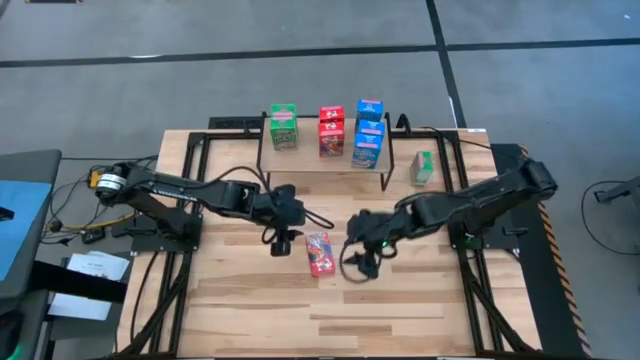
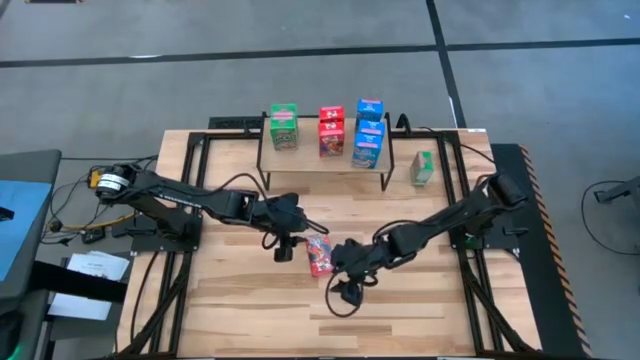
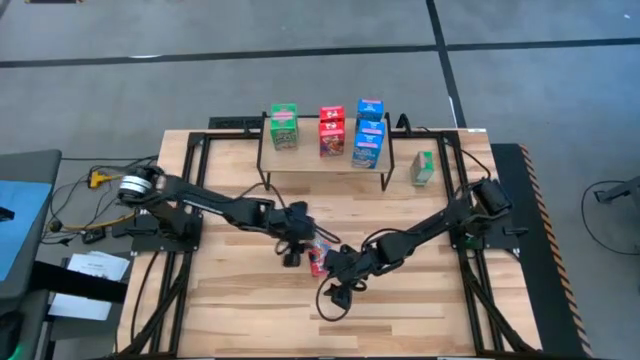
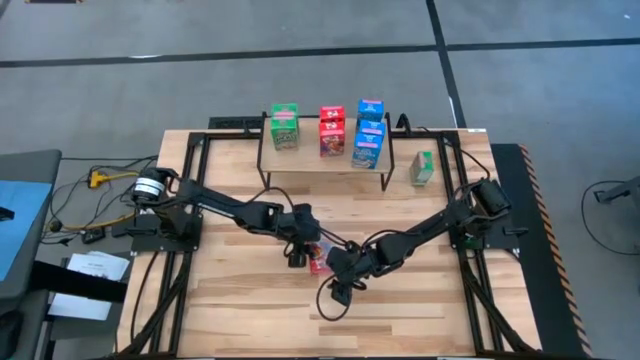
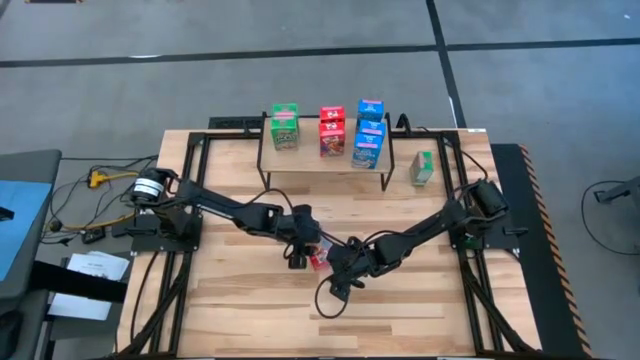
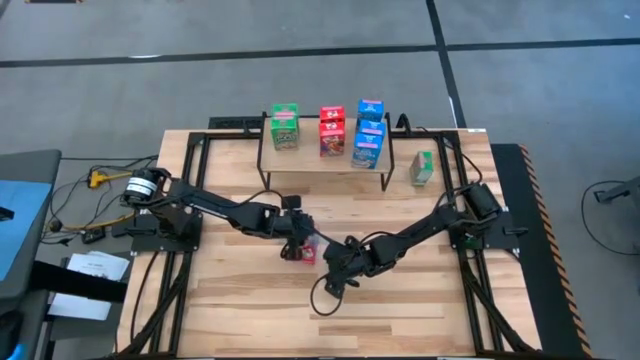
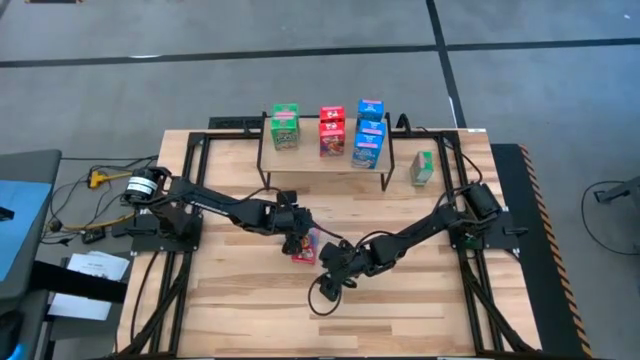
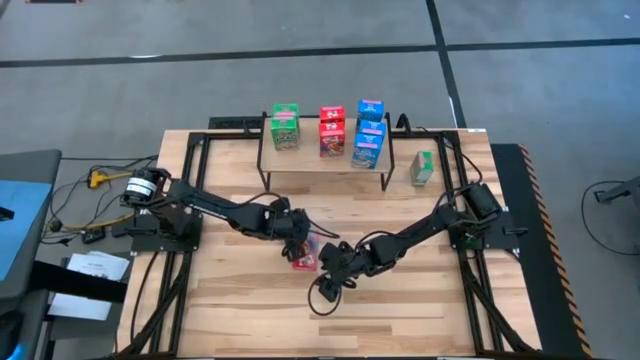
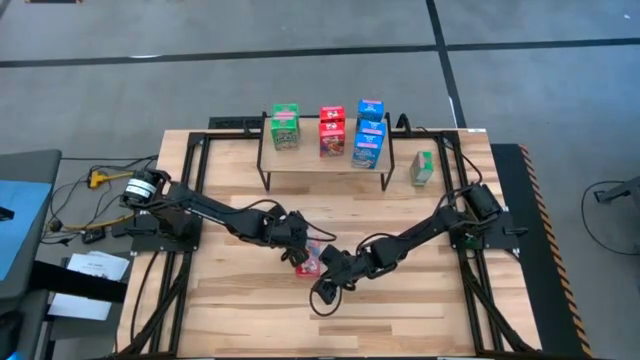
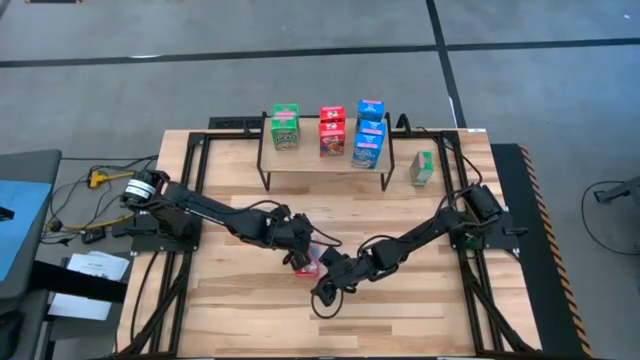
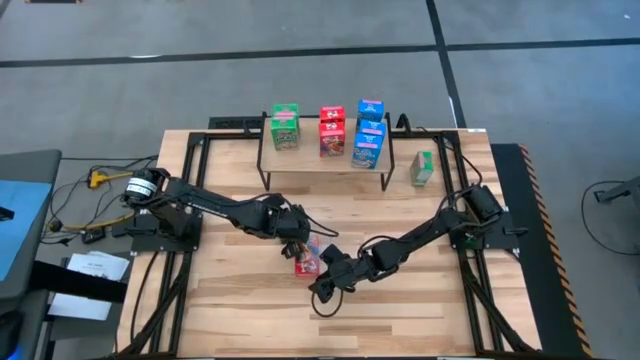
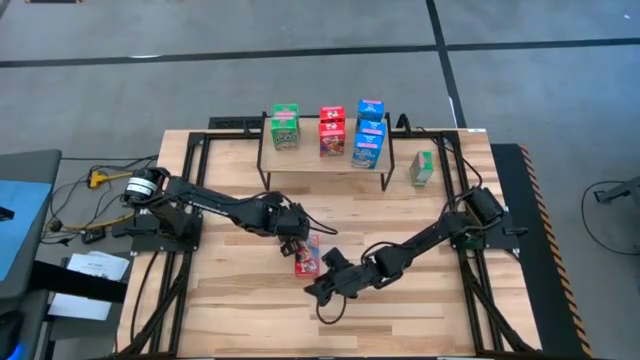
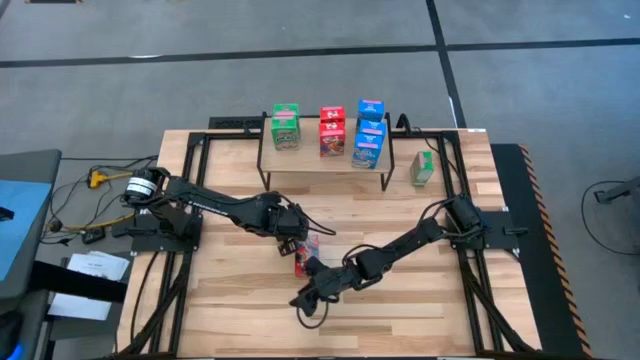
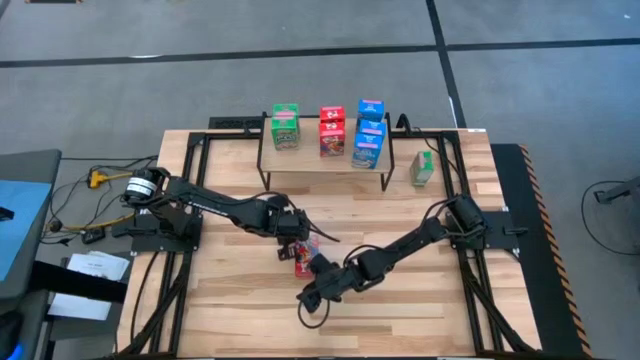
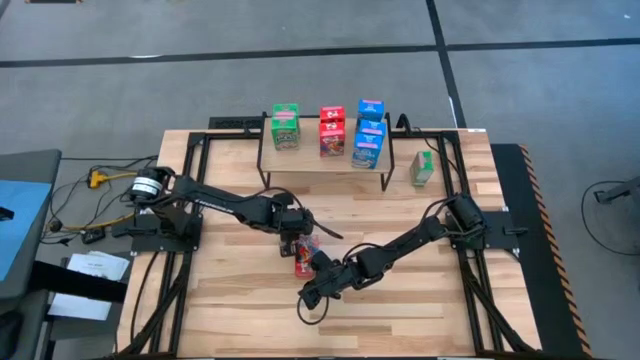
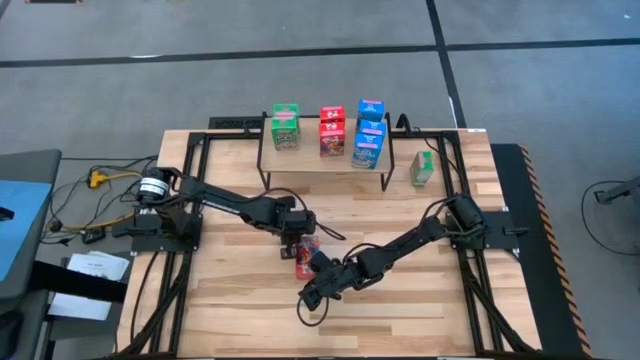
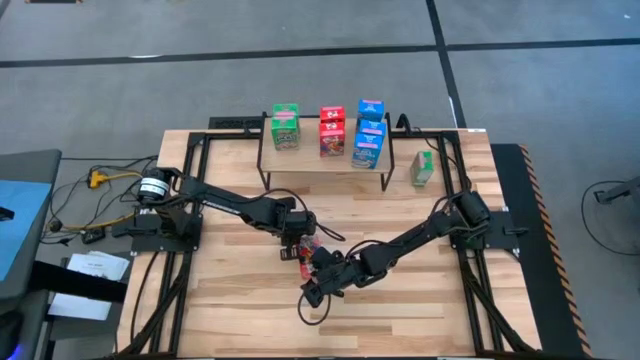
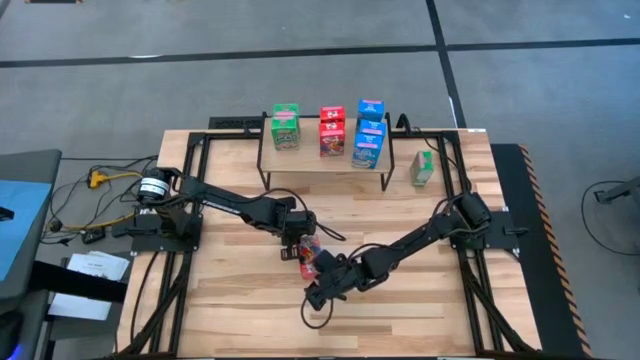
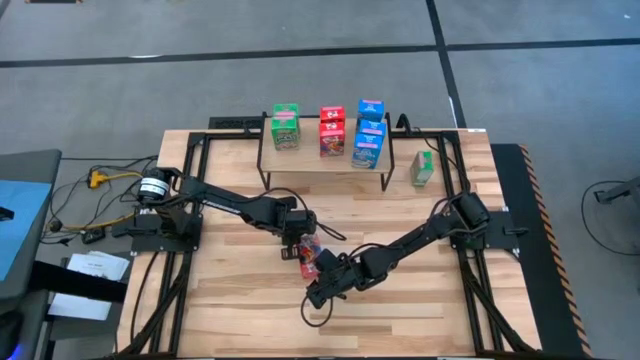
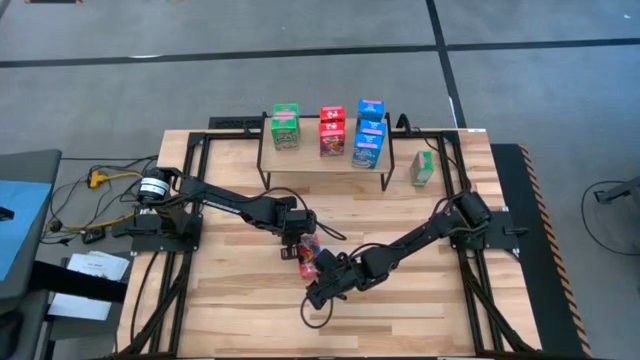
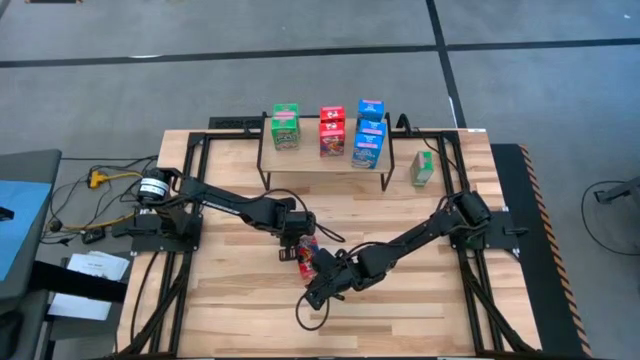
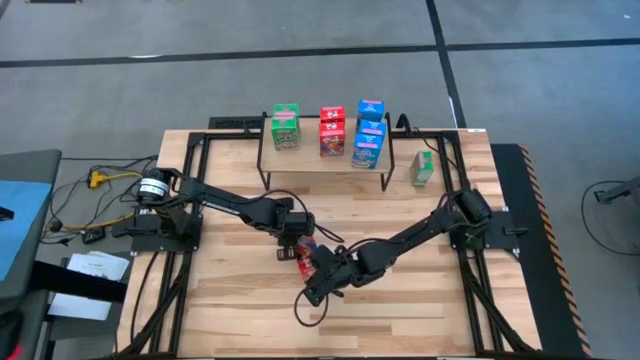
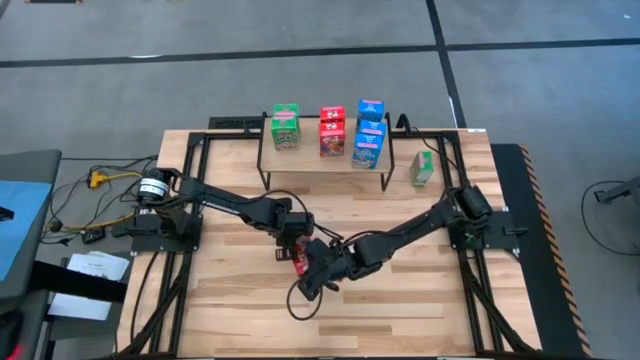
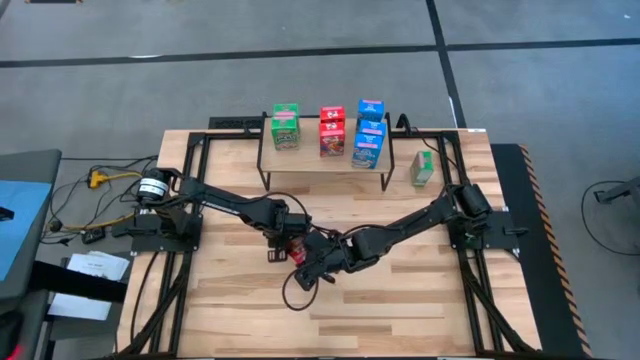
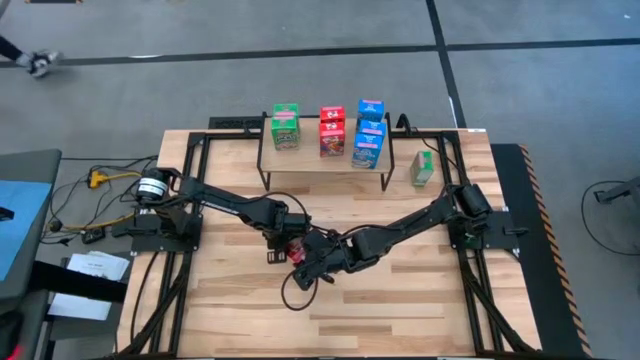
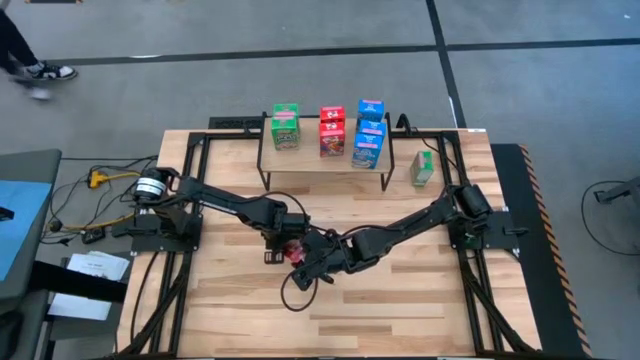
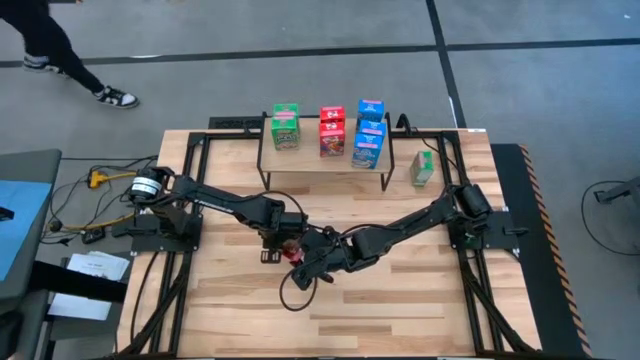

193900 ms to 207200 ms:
Task: Stack cereal on shelf
Put the red cereal box on the shelf aligned with the other red cereal box
